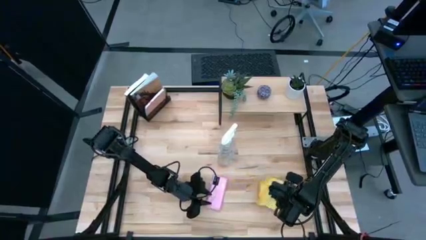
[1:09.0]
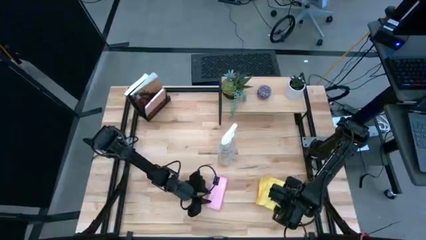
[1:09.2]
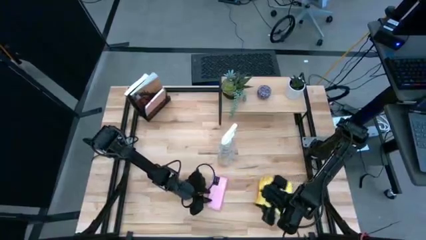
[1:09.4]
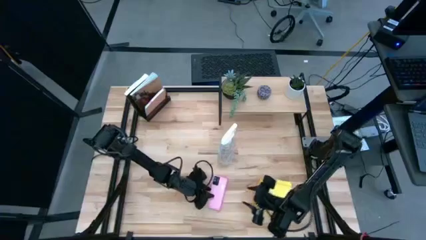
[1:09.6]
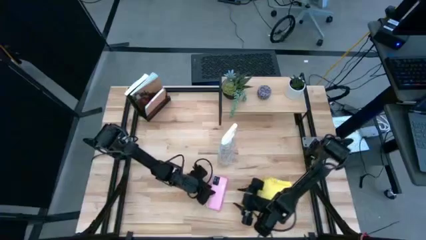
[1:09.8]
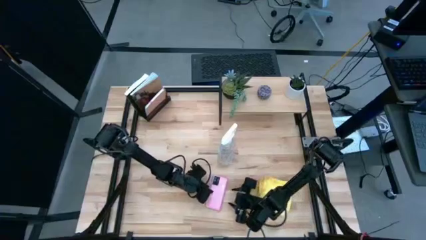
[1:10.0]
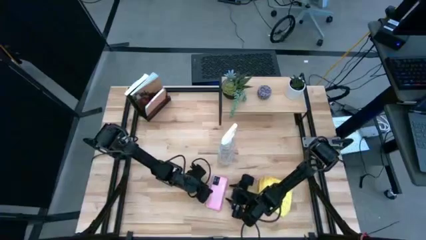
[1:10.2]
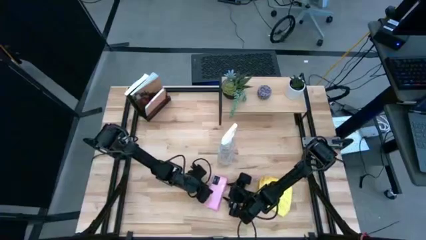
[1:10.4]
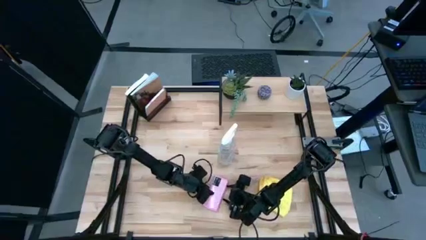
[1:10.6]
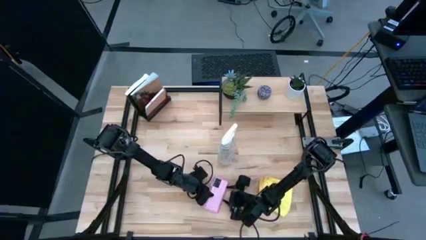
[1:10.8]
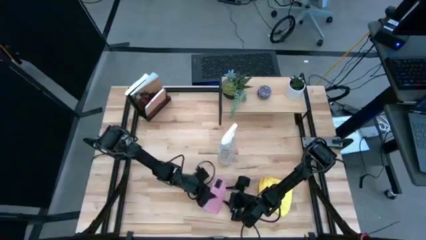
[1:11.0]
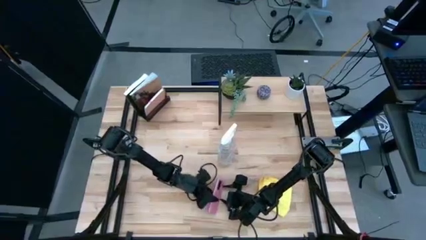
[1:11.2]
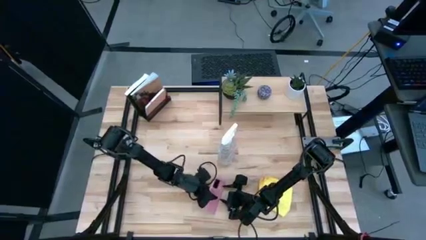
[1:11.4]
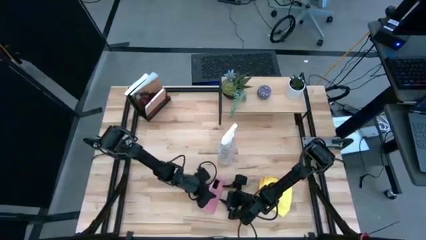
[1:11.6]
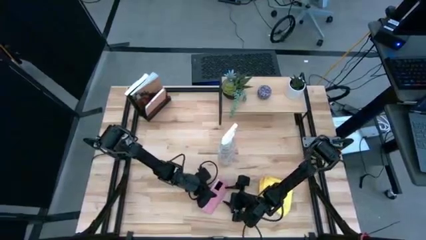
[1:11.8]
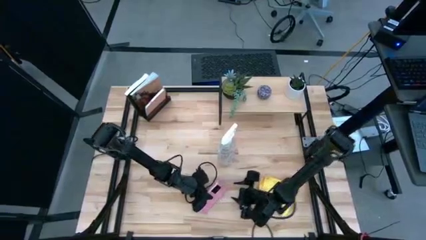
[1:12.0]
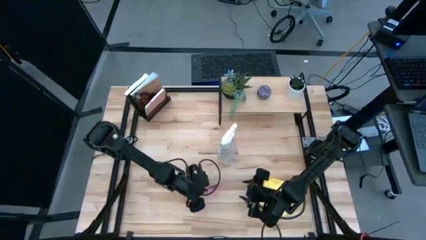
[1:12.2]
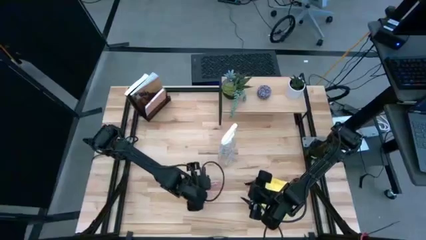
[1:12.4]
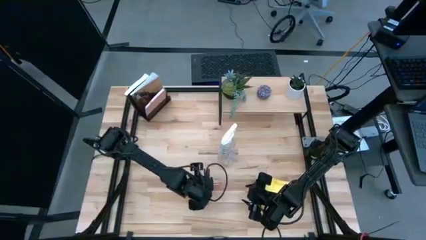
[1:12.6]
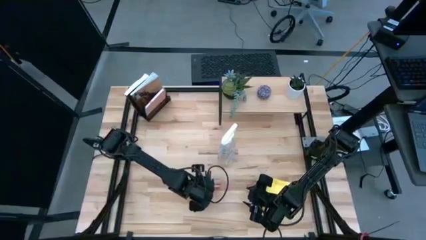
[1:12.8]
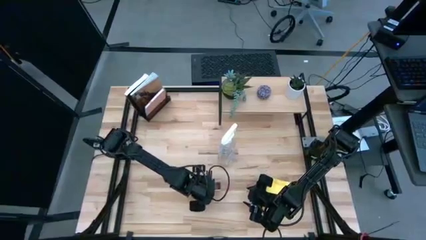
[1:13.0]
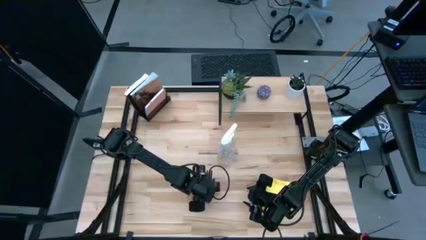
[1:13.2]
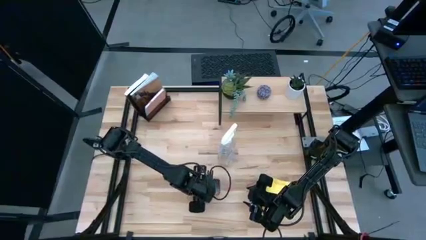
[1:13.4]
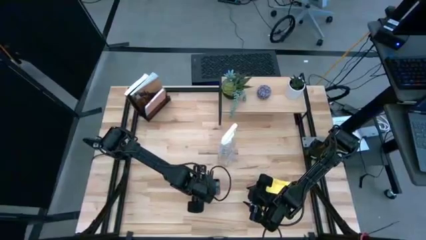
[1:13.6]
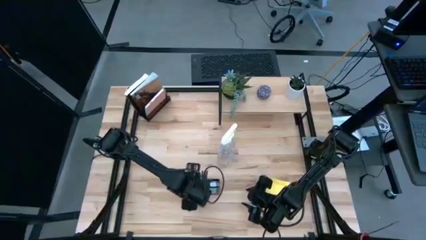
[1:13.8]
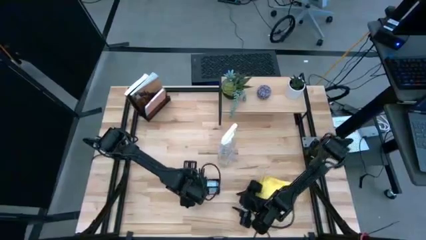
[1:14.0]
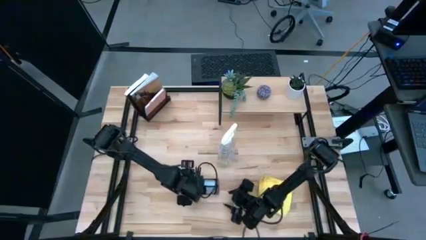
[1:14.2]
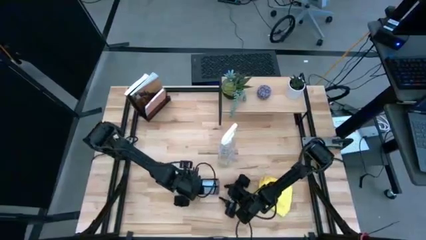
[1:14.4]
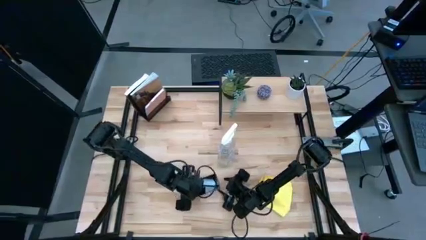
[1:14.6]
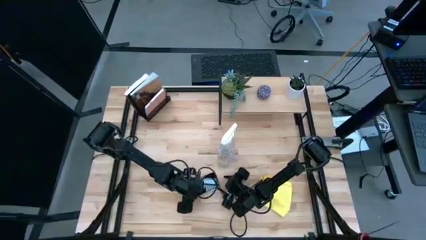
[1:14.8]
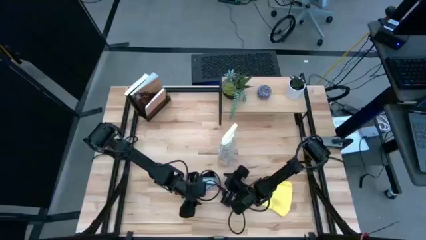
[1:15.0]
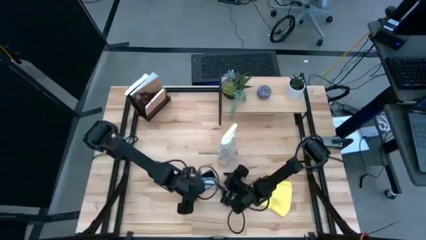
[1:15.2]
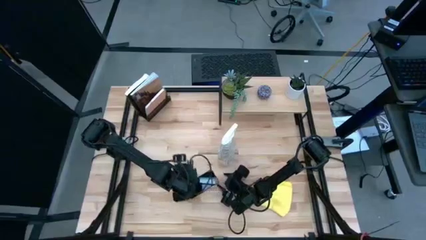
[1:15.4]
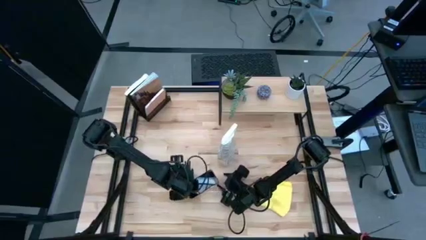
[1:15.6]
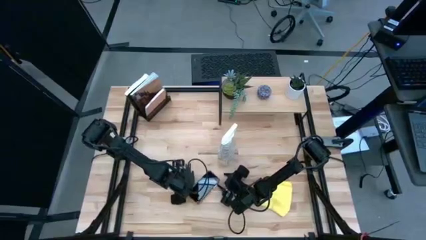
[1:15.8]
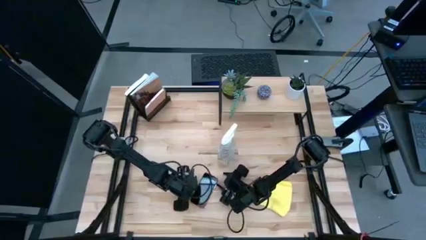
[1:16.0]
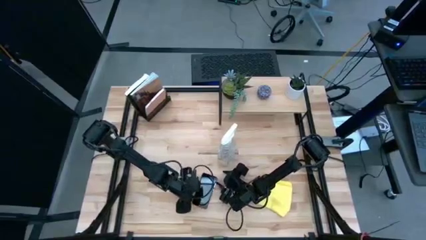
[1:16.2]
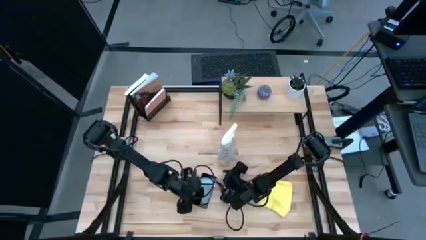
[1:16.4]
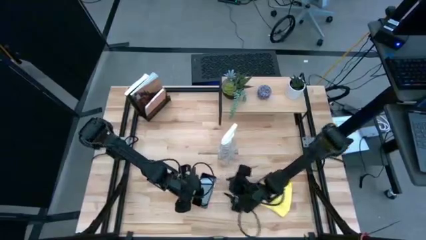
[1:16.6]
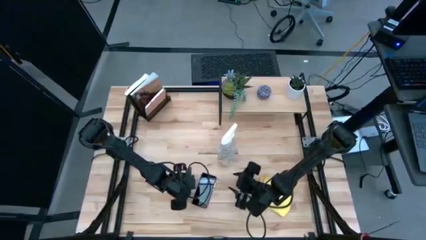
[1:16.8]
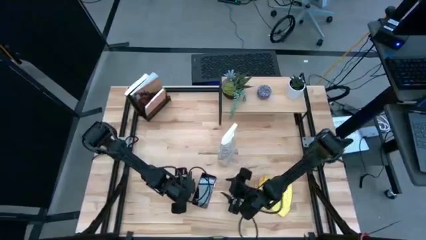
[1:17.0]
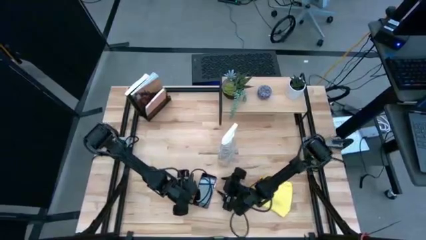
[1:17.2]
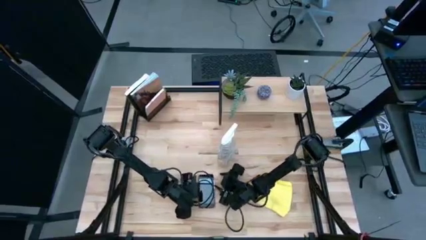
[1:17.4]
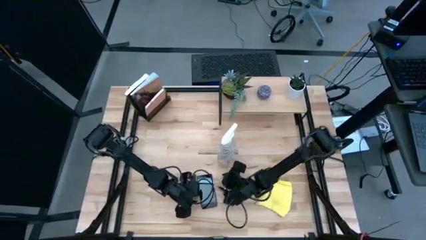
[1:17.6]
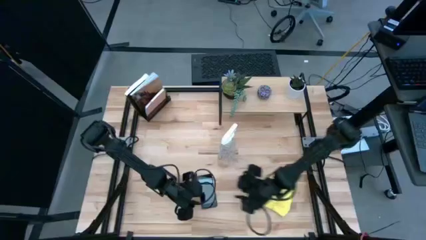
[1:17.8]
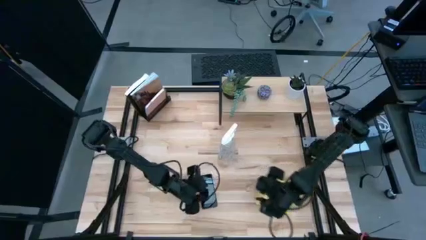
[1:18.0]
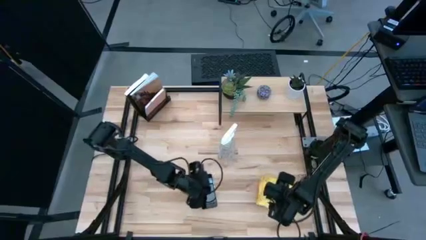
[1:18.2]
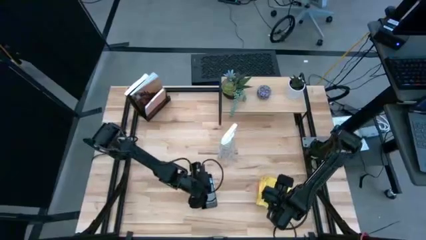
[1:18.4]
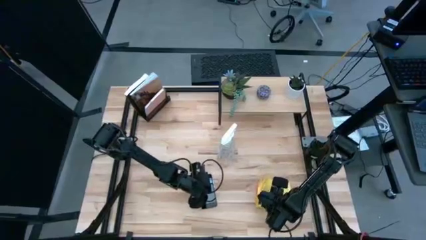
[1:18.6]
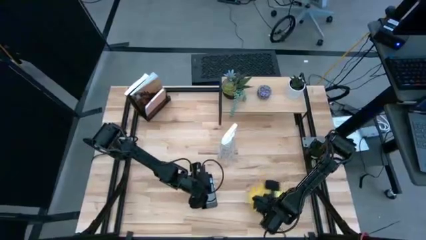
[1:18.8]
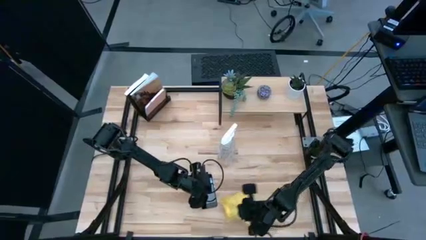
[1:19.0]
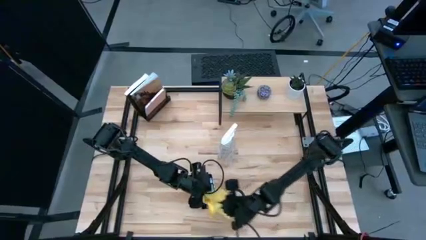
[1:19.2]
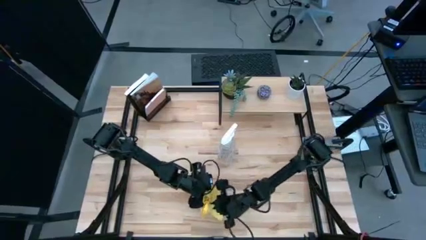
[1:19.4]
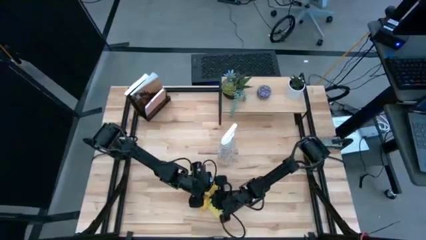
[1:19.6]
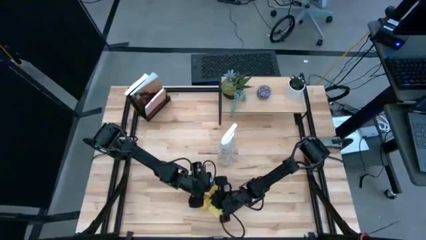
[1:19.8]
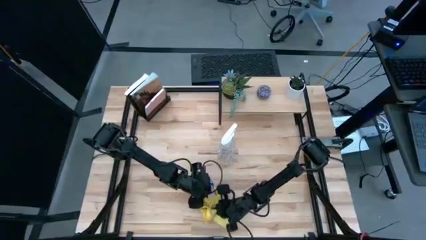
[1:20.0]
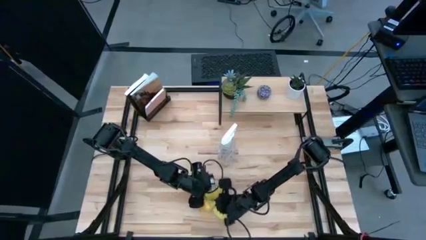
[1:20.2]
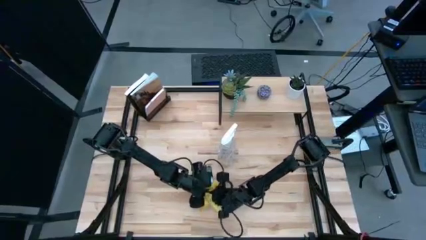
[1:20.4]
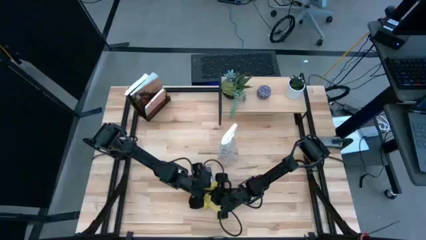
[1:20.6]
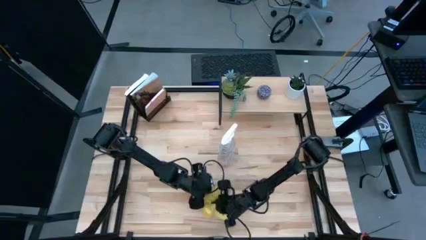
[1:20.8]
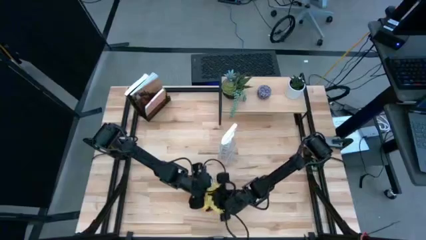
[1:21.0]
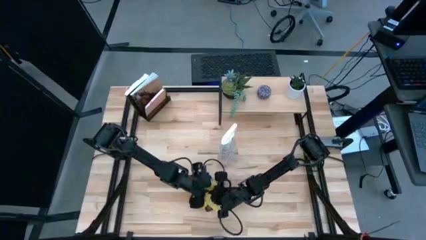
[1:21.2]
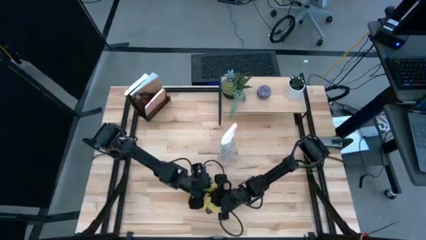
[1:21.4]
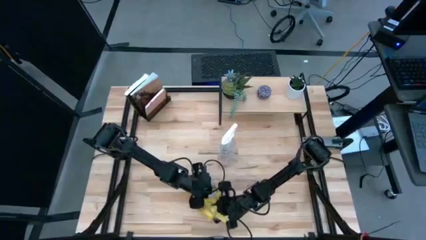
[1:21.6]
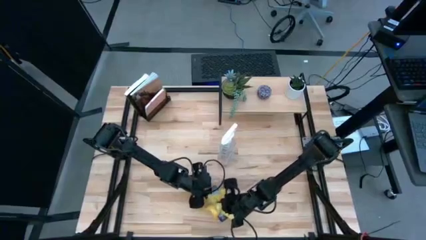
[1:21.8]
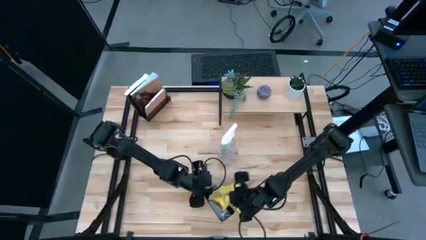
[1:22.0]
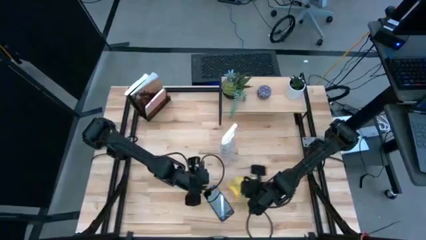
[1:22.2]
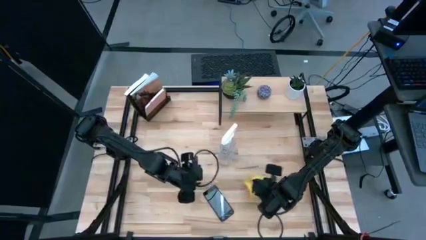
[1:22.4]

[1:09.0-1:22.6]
Task: Apply microfiber cloth
Wipe the front of the cellphone using the microfiber cloth
